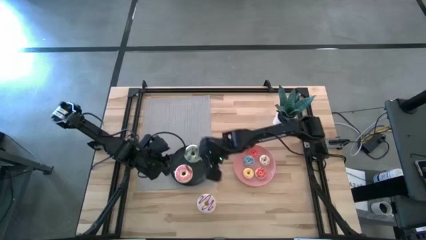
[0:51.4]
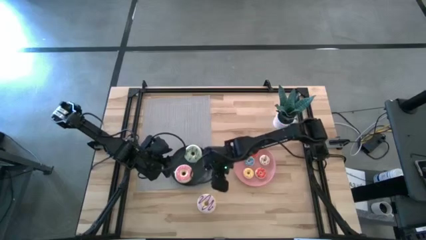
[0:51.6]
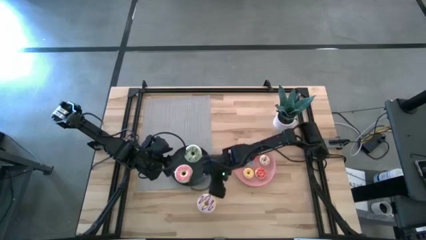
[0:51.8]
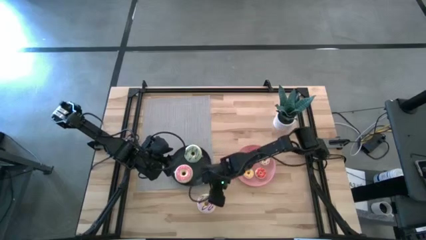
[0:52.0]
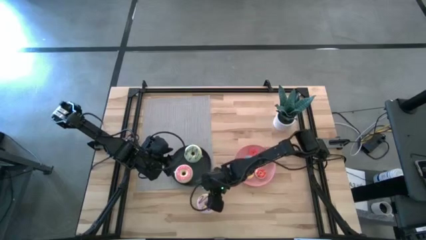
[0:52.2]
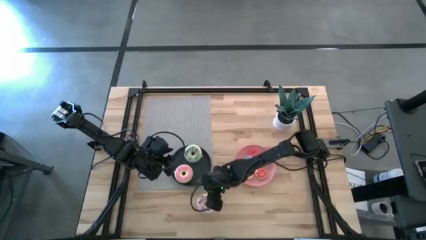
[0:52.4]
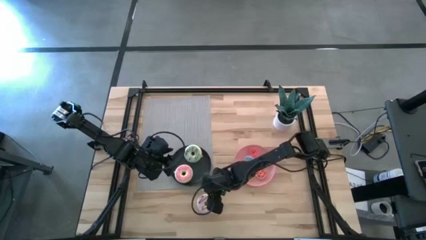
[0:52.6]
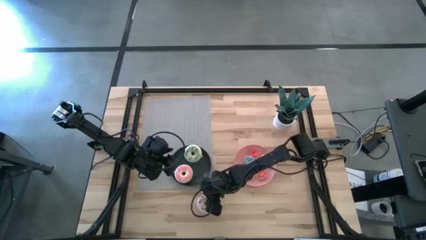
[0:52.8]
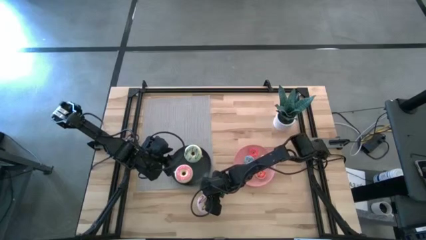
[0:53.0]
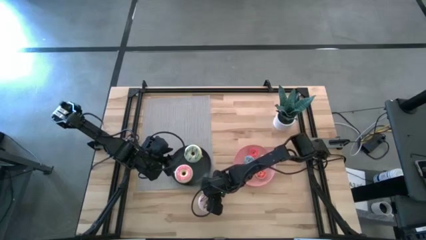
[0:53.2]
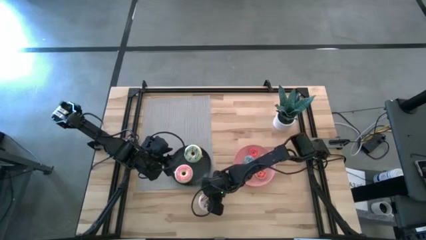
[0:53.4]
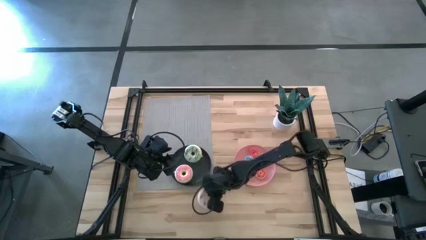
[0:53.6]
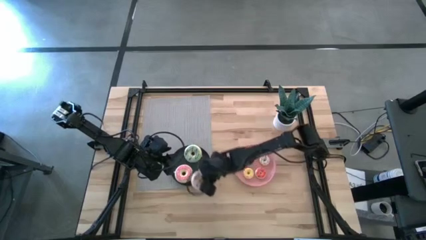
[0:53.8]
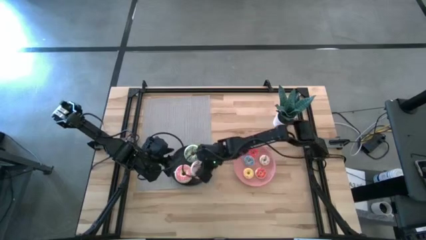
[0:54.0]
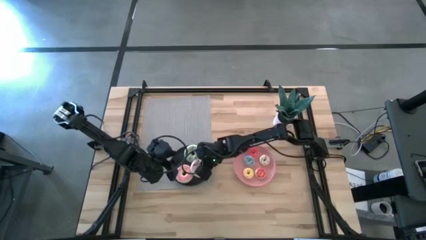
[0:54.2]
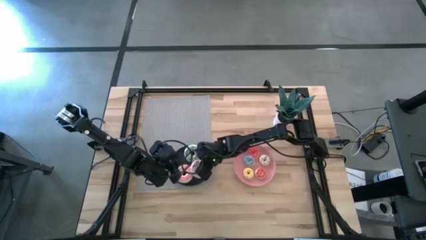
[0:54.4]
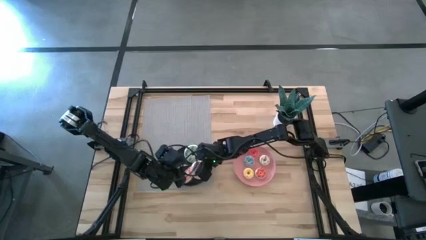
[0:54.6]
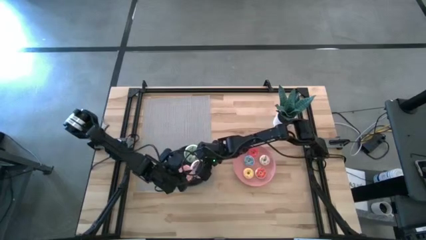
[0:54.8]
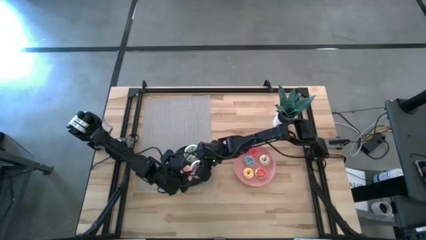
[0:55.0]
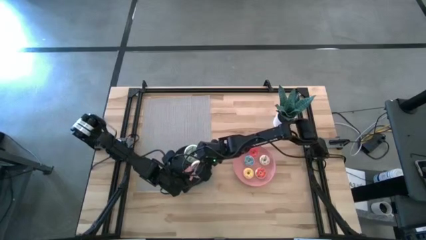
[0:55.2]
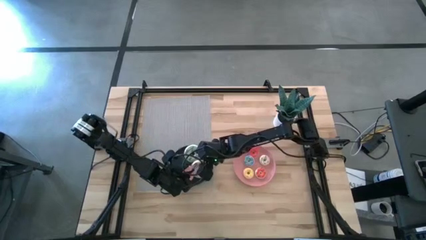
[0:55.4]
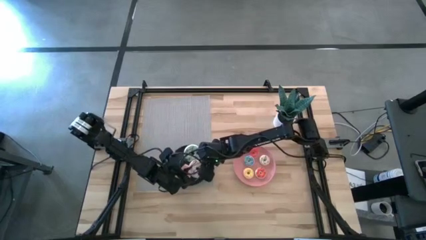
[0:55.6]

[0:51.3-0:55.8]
Task: Pick & Place donuts
Put the large purple donut onto the black plate

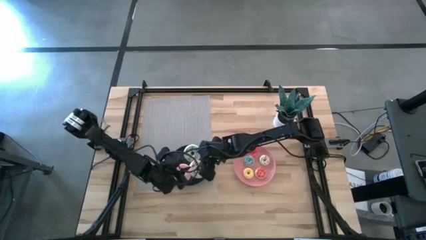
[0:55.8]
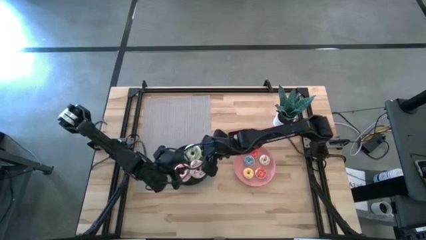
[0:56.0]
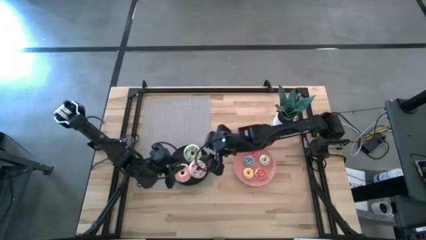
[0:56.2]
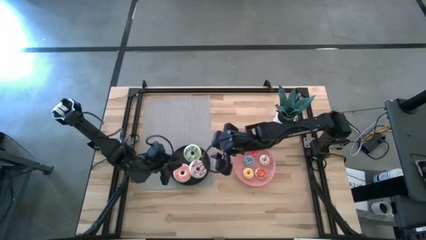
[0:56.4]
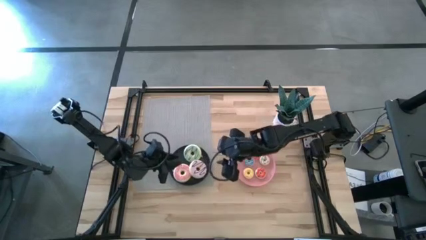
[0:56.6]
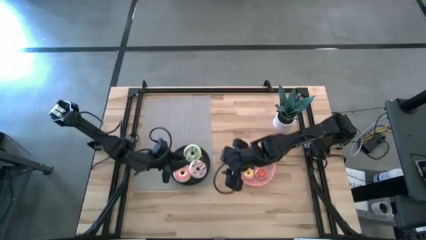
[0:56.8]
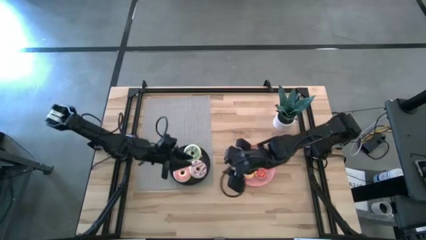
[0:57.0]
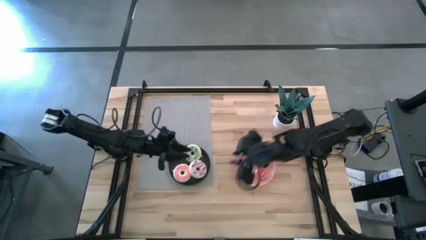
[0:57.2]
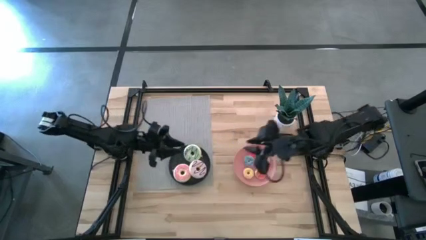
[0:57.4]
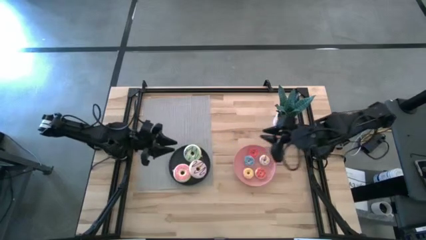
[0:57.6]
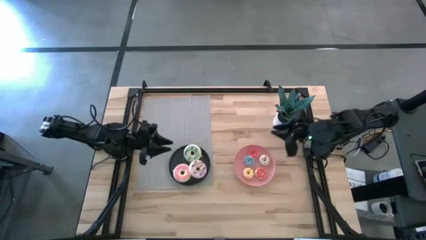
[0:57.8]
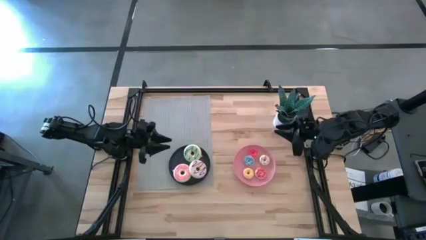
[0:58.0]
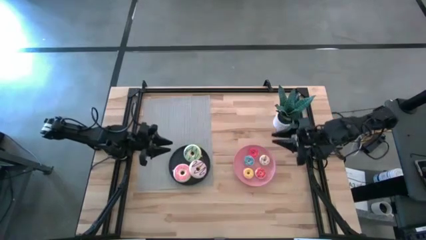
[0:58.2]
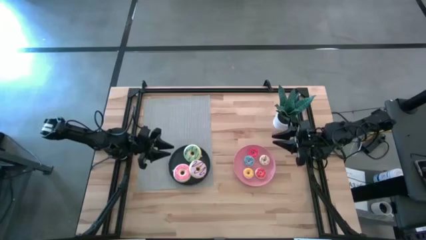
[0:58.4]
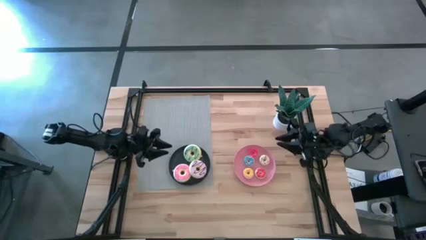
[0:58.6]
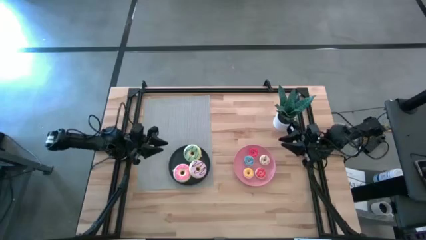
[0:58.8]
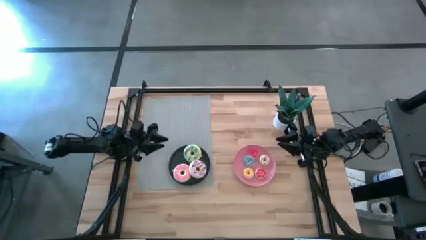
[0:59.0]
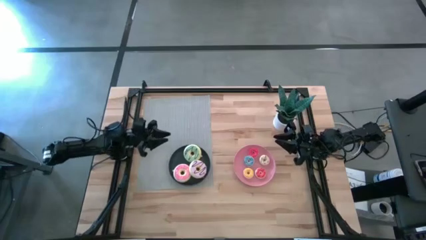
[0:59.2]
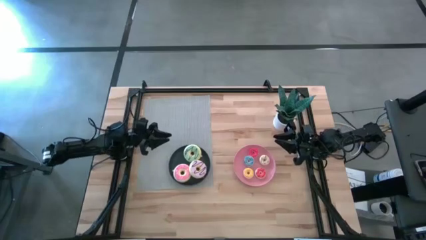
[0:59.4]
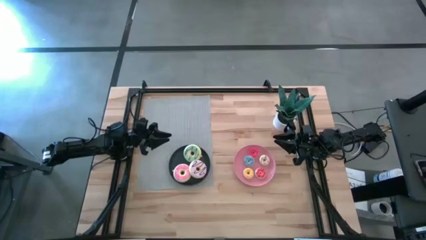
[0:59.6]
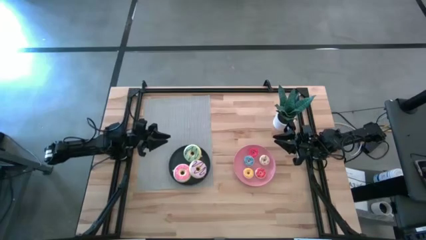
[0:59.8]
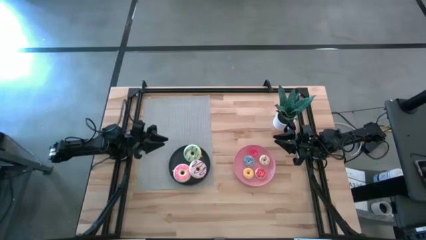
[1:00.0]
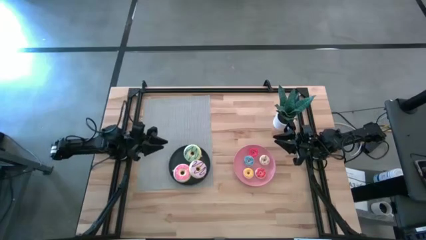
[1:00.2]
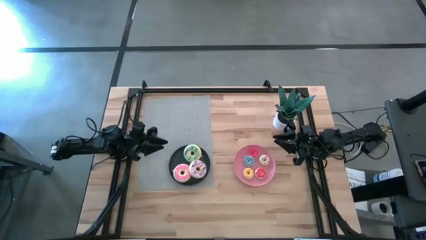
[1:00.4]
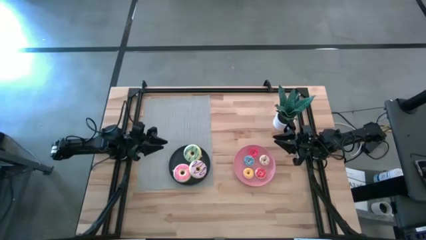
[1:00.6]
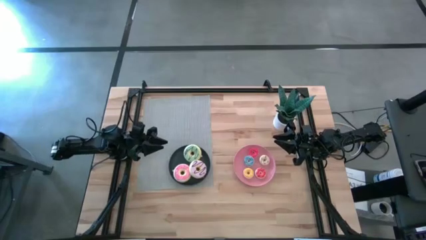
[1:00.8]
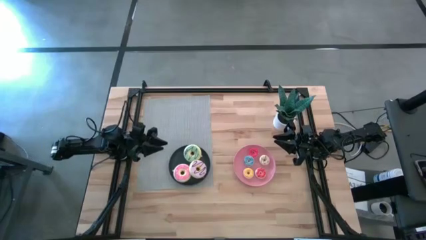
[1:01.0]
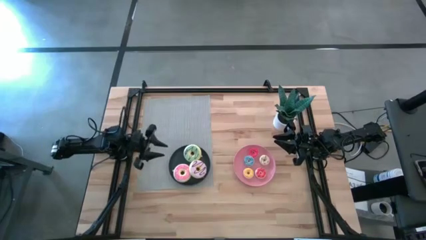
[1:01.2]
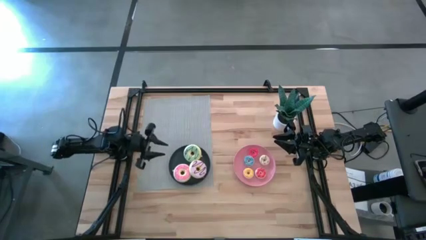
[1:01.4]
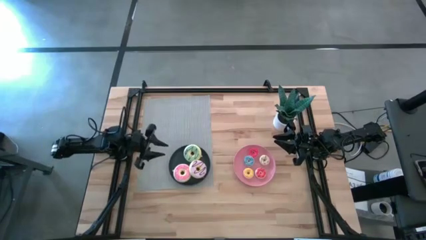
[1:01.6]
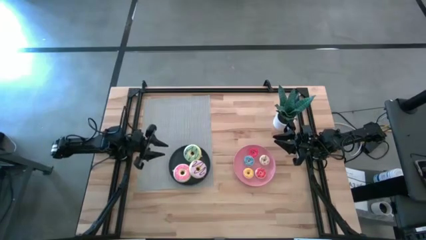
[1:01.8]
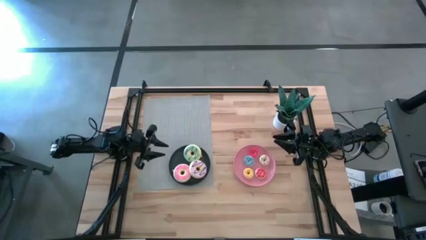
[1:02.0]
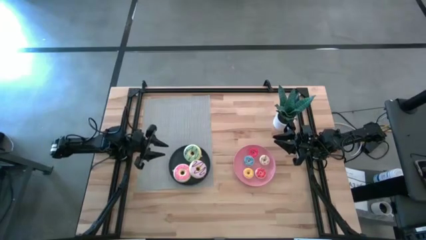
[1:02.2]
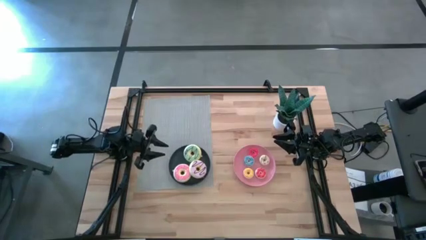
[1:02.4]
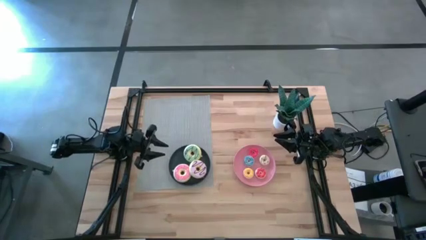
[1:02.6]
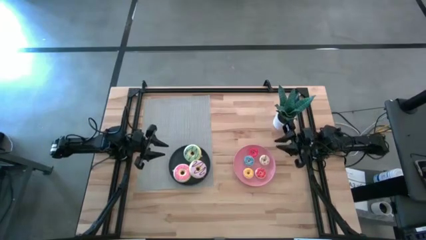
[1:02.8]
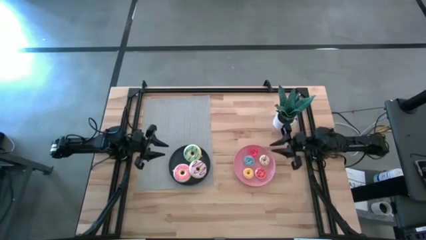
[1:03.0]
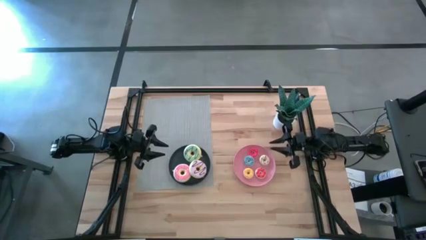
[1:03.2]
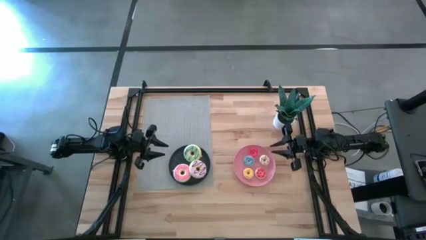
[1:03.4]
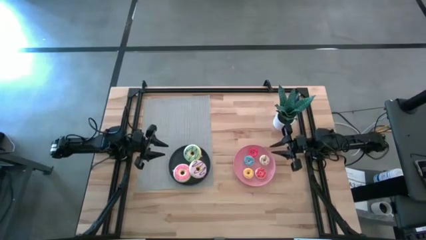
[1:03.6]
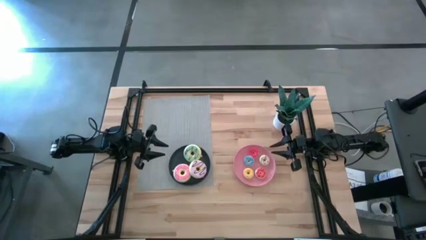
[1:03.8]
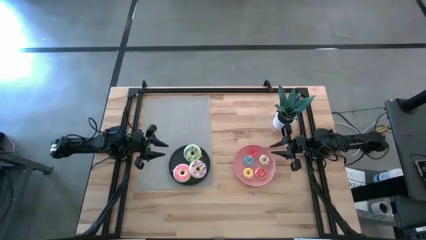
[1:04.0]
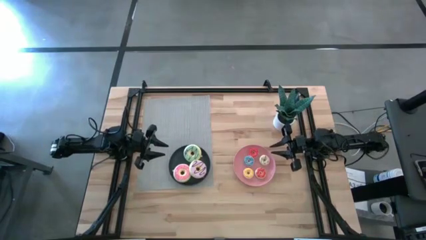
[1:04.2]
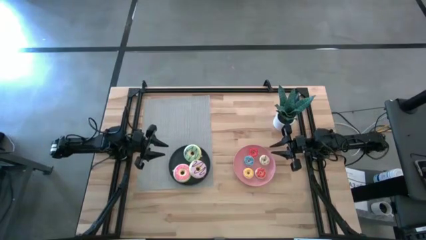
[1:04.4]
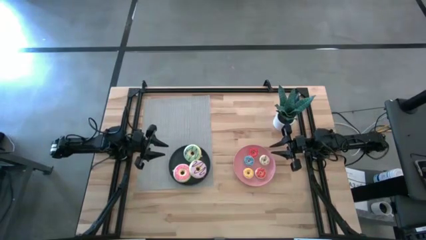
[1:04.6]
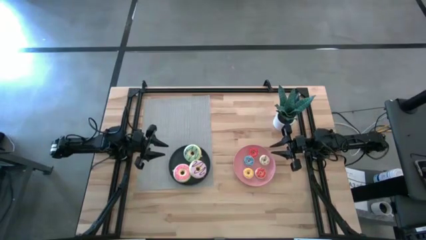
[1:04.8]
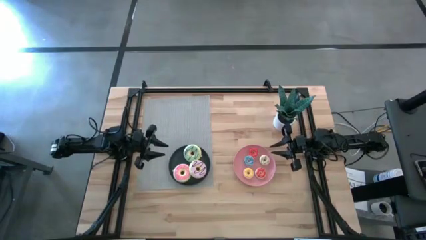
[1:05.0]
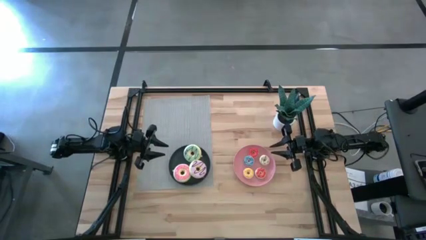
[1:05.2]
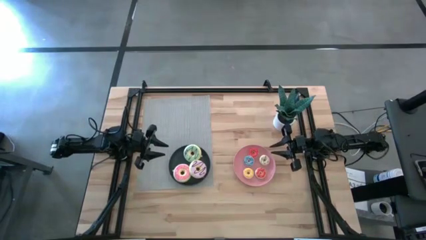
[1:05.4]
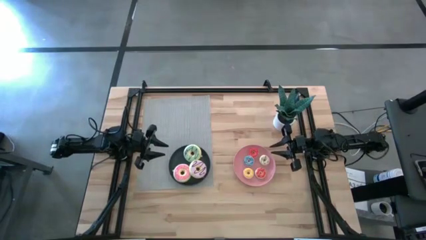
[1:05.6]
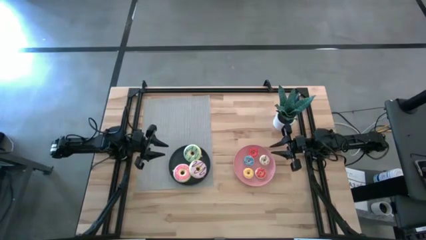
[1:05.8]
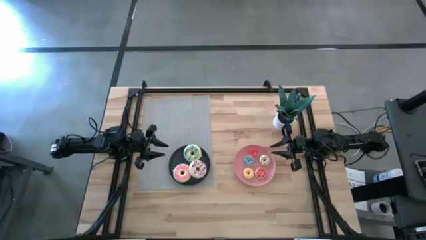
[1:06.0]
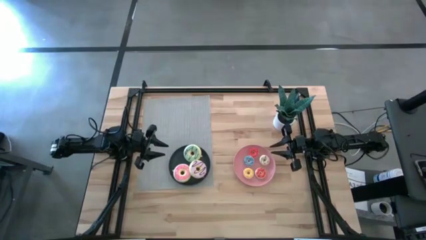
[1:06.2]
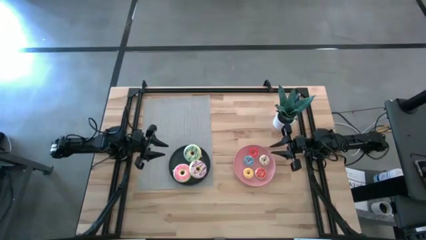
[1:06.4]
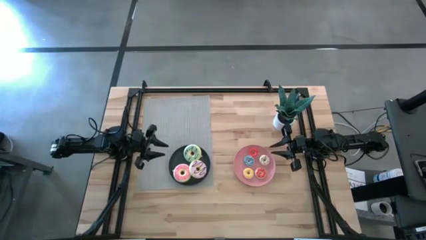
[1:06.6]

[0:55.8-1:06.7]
Return to Home Position

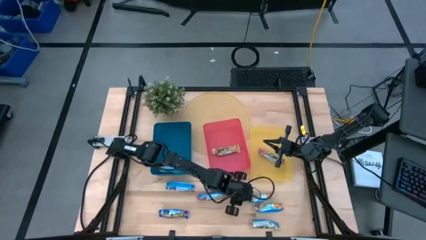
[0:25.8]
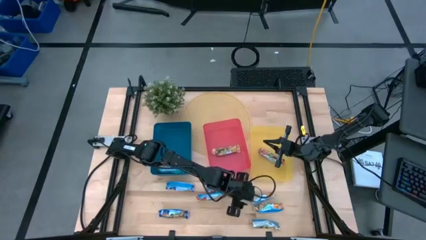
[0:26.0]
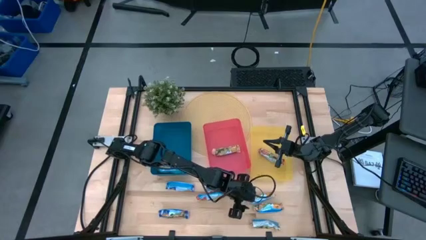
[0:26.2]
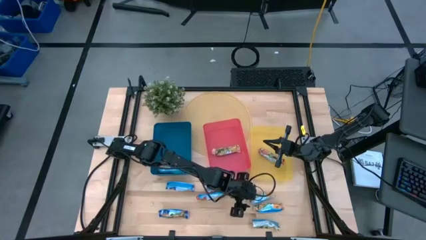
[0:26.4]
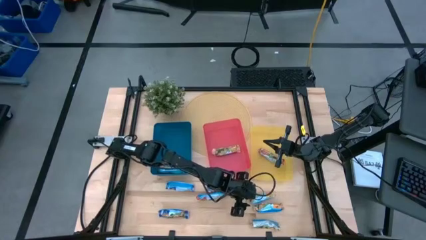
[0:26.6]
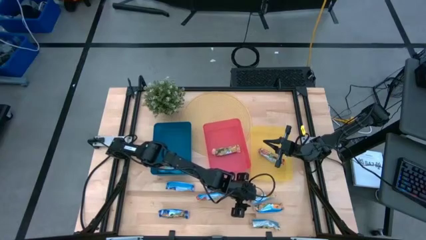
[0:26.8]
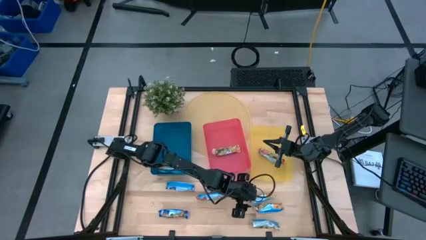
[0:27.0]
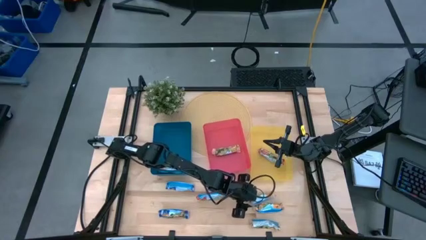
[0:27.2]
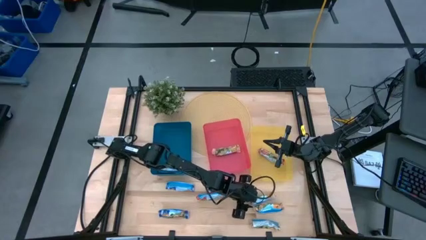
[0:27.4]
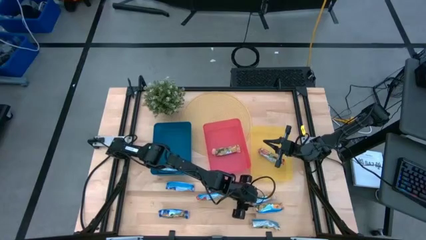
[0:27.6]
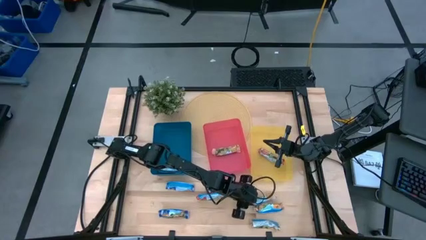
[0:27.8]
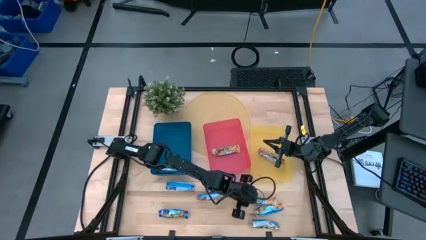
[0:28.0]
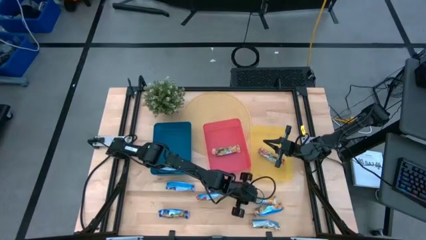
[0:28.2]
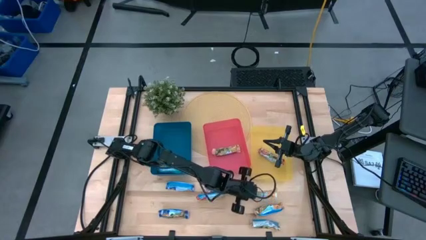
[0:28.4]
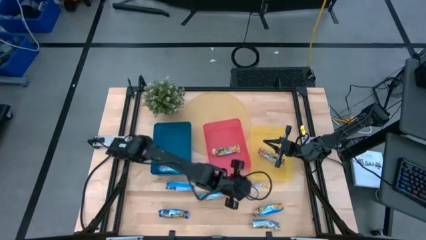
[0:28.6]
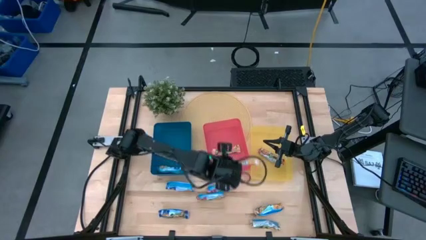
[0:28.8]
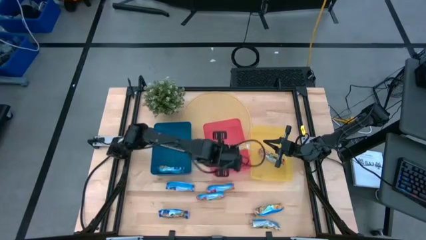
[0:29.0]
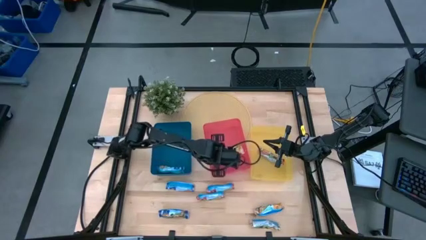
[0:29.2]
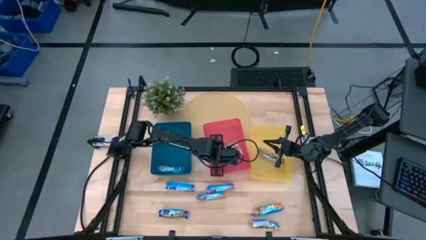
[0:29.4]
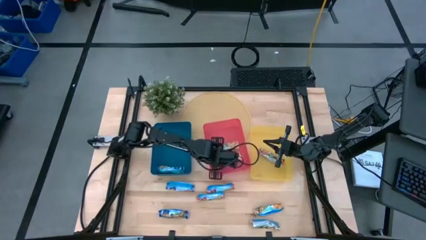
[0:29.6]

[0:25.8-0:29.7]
Task: Pick and place Granola Bars by type
Put the yellow granola bar into the red bin
